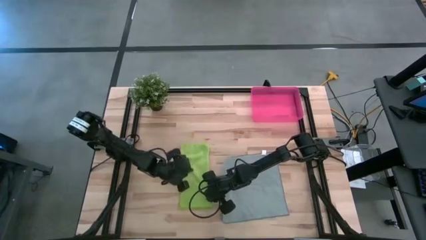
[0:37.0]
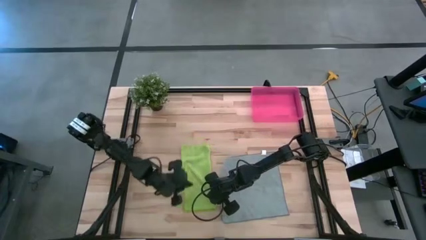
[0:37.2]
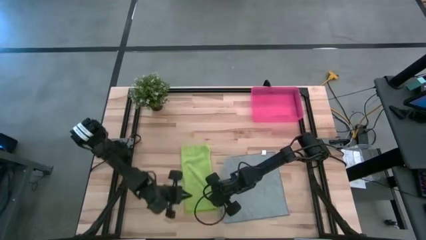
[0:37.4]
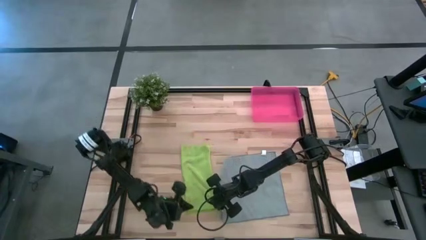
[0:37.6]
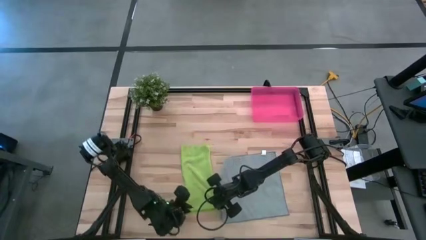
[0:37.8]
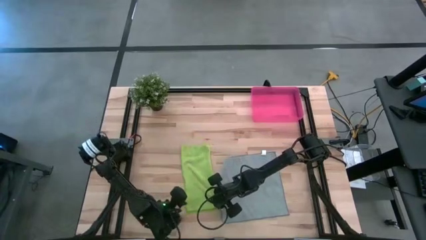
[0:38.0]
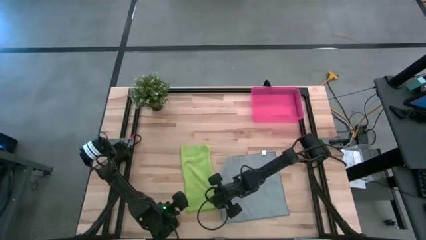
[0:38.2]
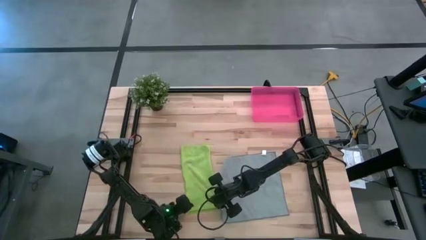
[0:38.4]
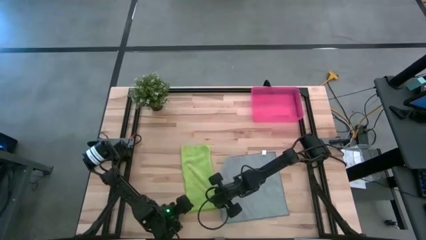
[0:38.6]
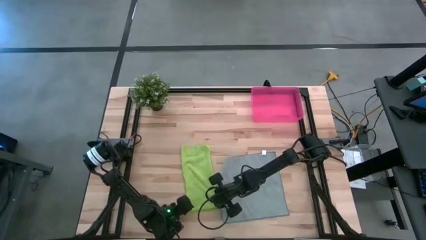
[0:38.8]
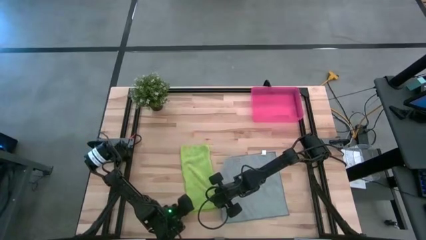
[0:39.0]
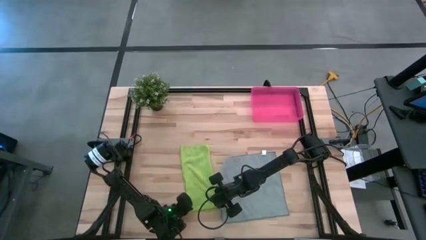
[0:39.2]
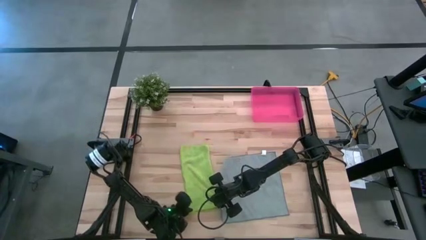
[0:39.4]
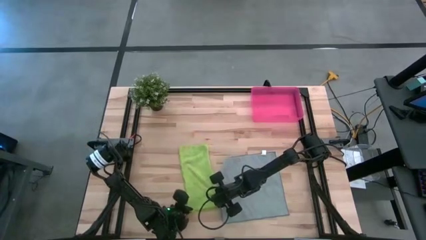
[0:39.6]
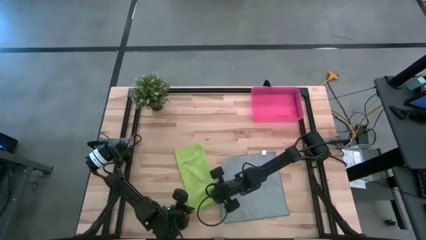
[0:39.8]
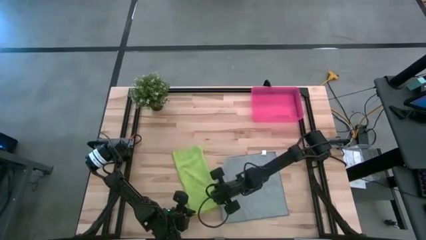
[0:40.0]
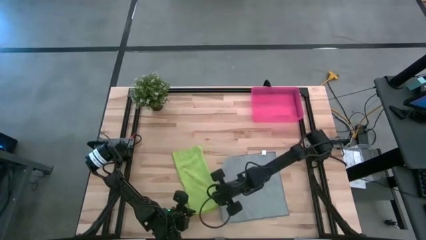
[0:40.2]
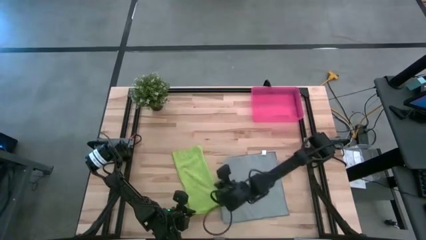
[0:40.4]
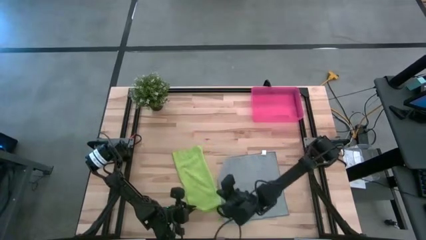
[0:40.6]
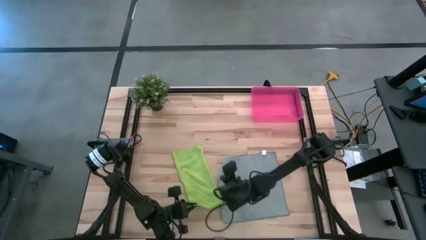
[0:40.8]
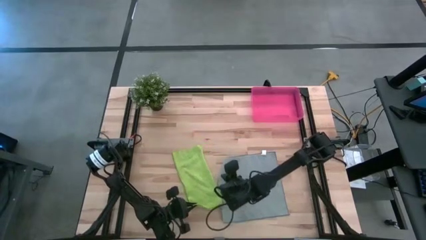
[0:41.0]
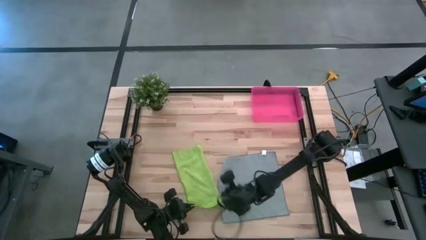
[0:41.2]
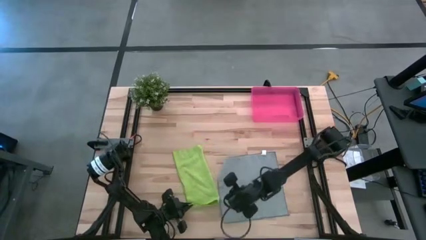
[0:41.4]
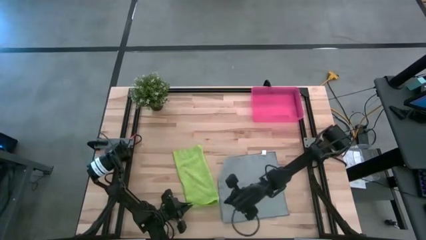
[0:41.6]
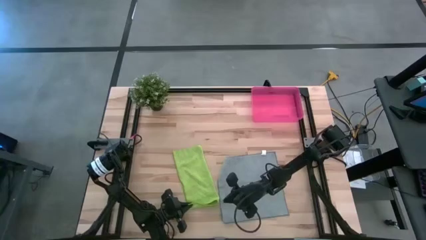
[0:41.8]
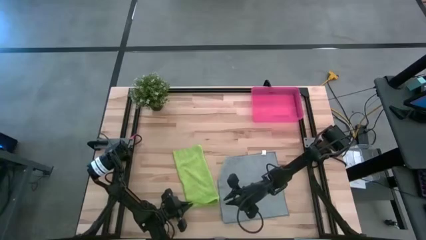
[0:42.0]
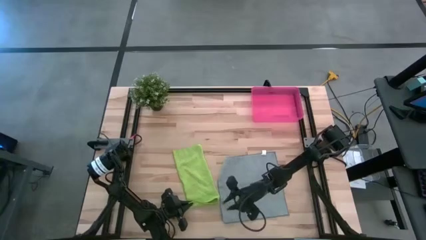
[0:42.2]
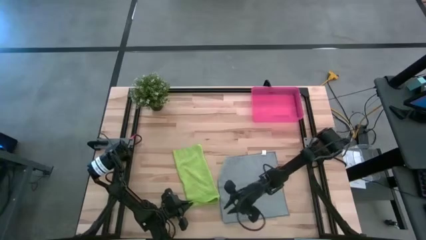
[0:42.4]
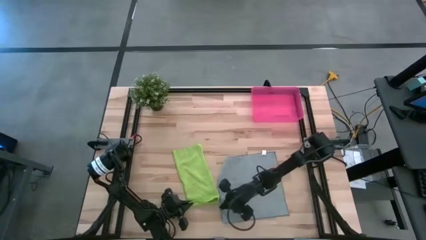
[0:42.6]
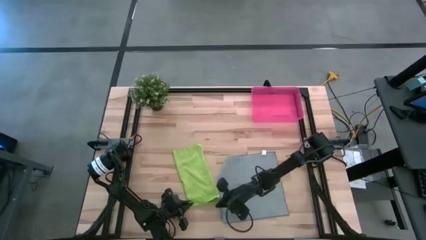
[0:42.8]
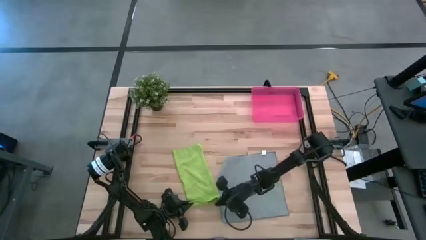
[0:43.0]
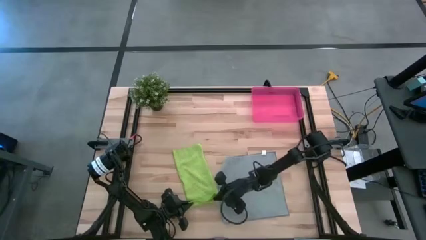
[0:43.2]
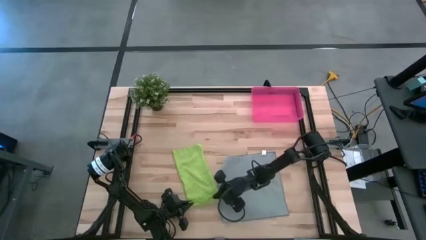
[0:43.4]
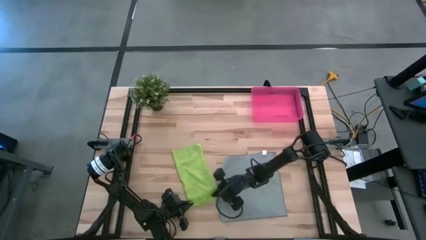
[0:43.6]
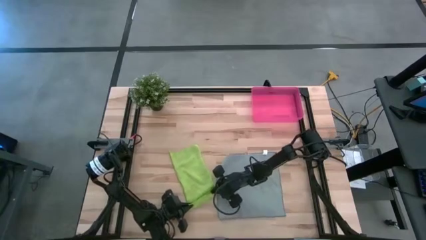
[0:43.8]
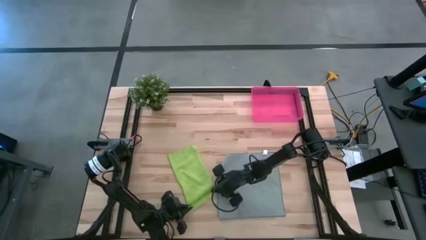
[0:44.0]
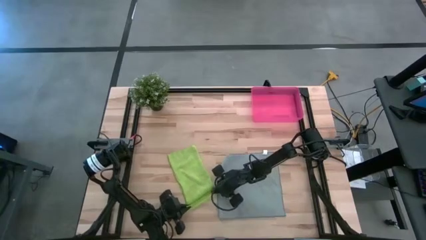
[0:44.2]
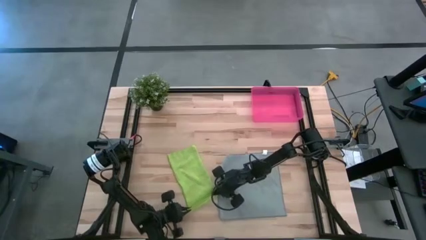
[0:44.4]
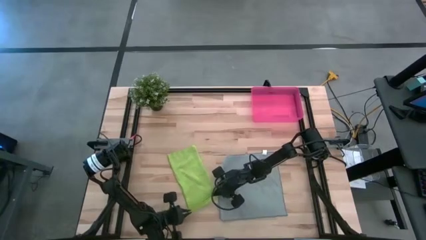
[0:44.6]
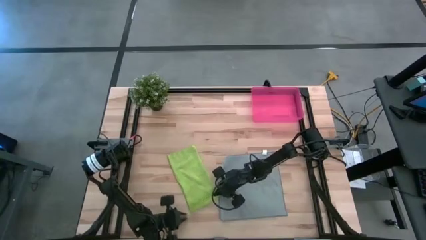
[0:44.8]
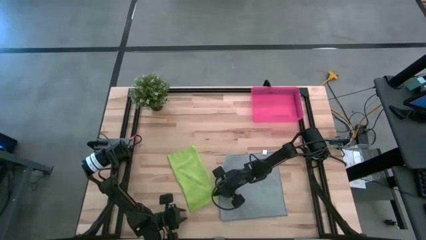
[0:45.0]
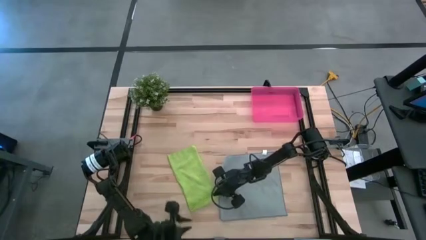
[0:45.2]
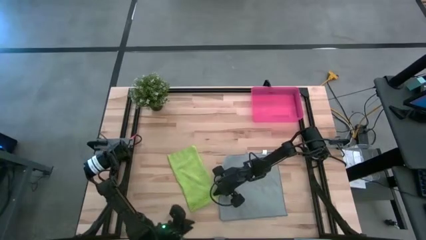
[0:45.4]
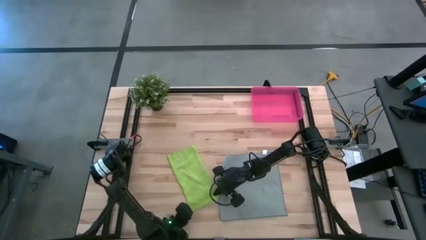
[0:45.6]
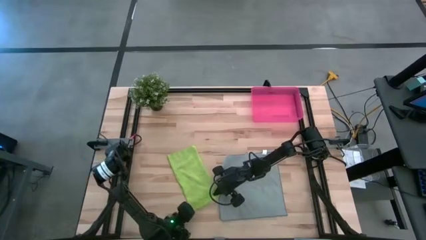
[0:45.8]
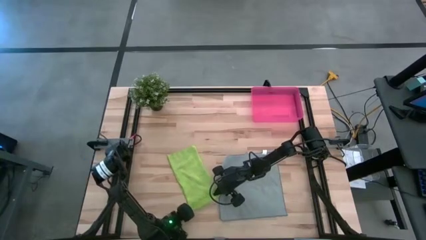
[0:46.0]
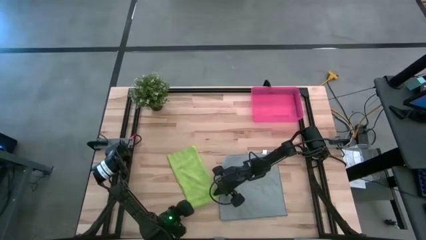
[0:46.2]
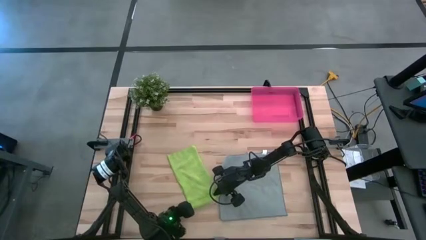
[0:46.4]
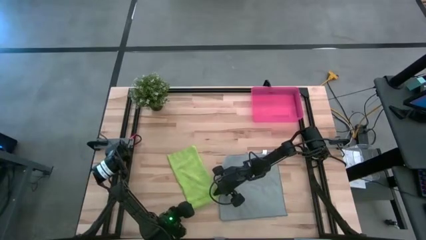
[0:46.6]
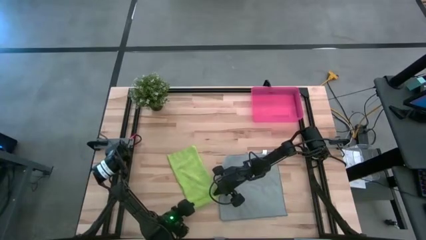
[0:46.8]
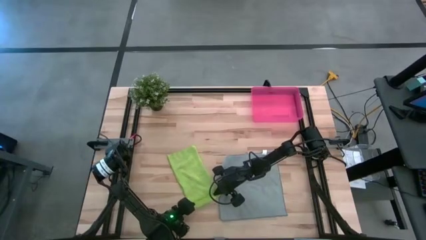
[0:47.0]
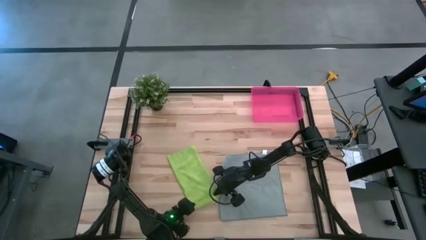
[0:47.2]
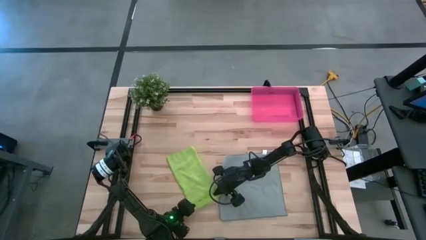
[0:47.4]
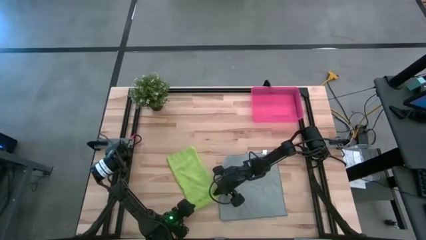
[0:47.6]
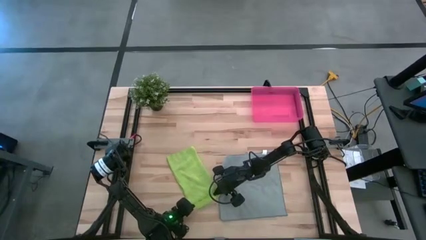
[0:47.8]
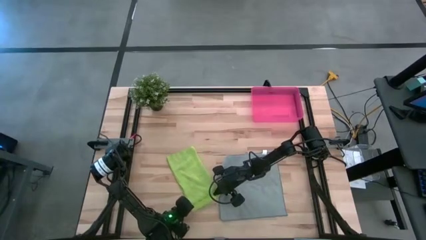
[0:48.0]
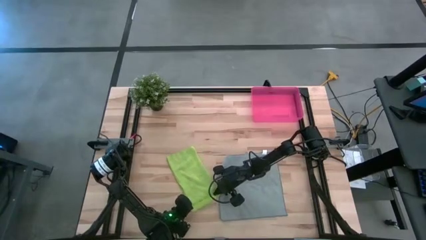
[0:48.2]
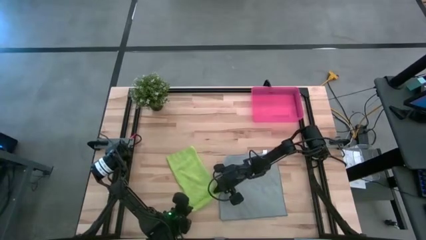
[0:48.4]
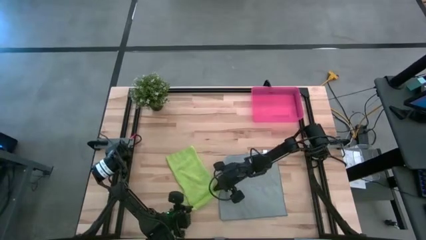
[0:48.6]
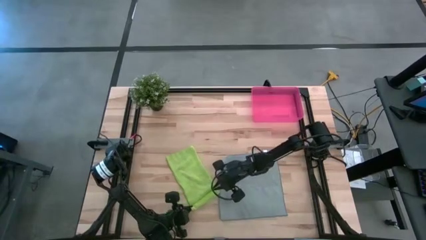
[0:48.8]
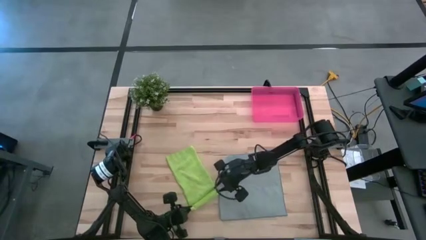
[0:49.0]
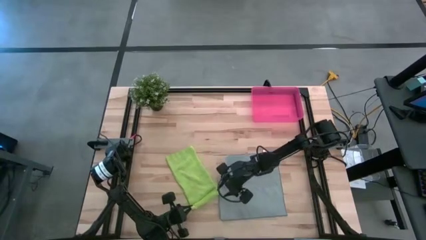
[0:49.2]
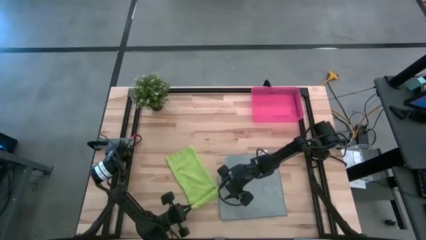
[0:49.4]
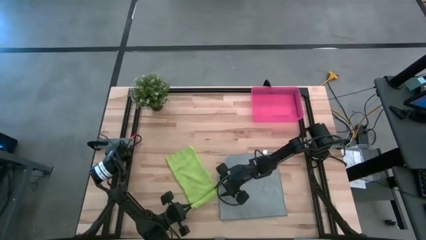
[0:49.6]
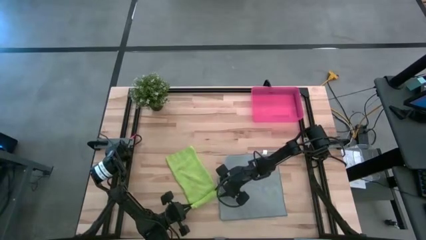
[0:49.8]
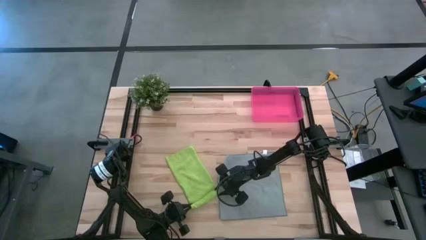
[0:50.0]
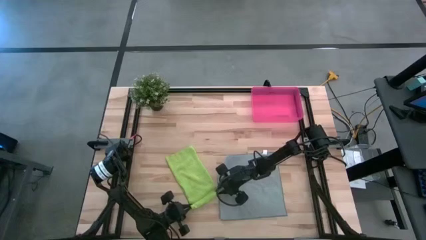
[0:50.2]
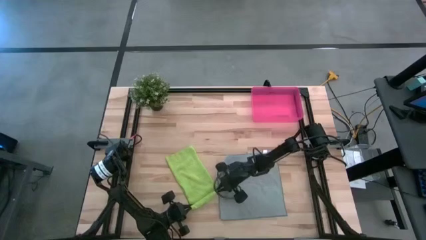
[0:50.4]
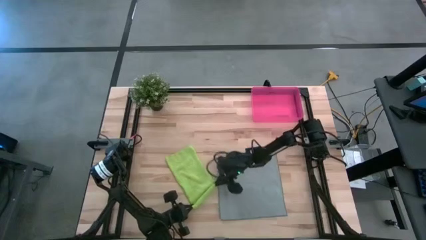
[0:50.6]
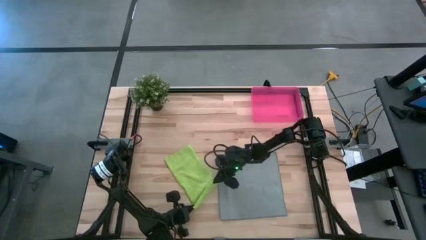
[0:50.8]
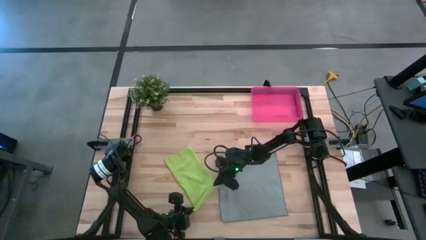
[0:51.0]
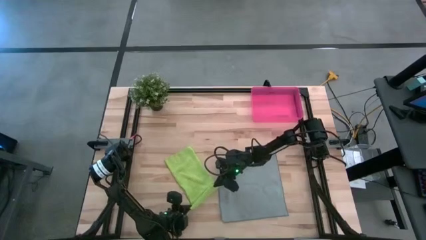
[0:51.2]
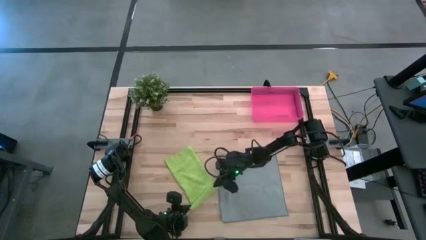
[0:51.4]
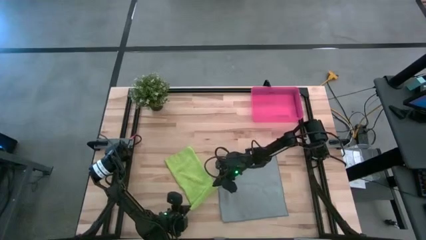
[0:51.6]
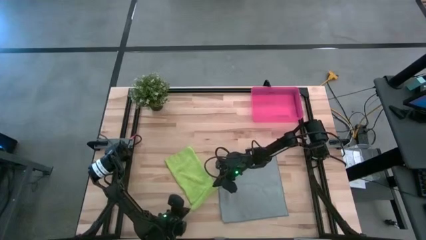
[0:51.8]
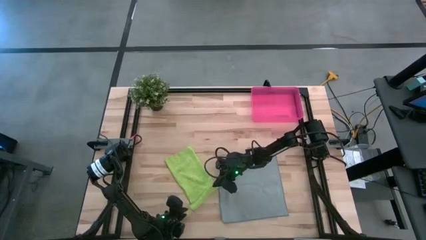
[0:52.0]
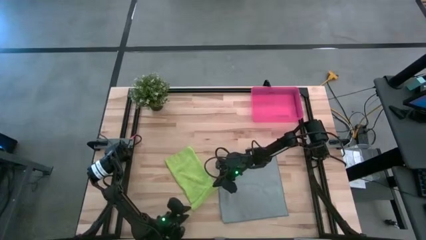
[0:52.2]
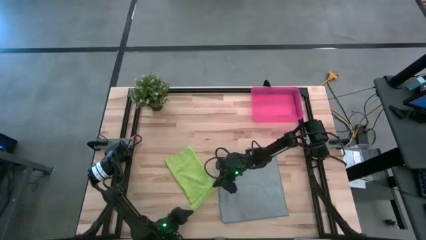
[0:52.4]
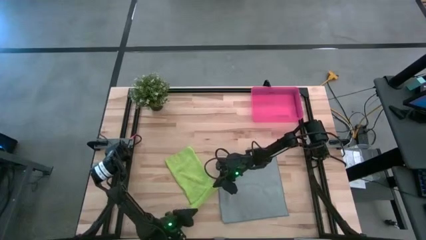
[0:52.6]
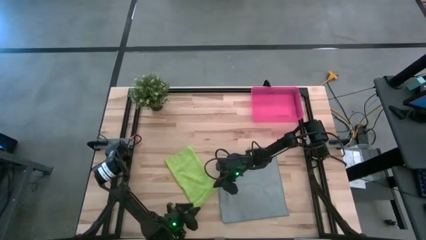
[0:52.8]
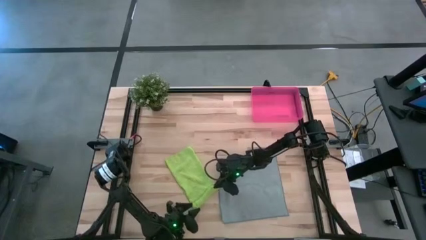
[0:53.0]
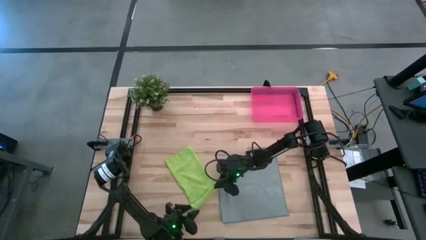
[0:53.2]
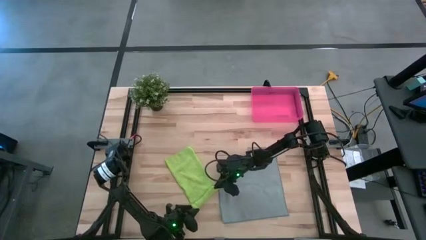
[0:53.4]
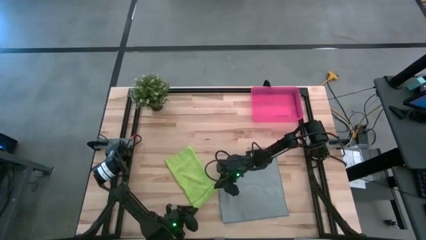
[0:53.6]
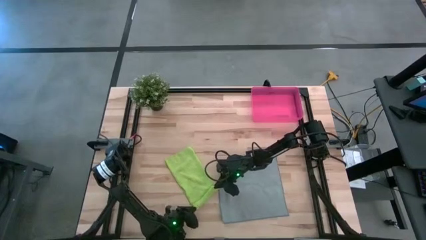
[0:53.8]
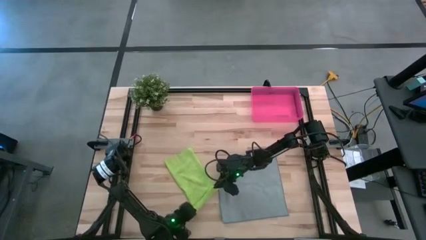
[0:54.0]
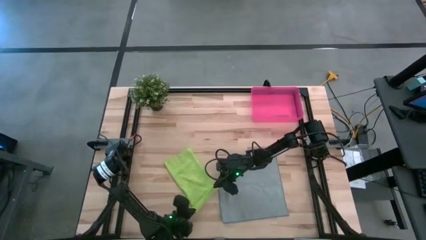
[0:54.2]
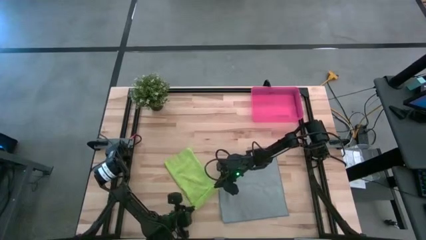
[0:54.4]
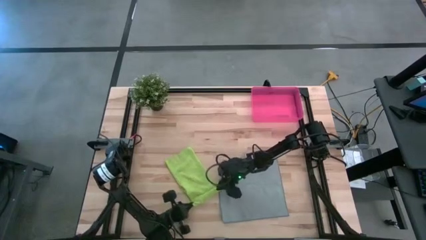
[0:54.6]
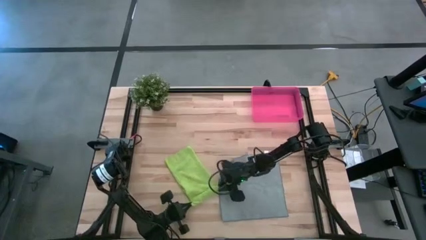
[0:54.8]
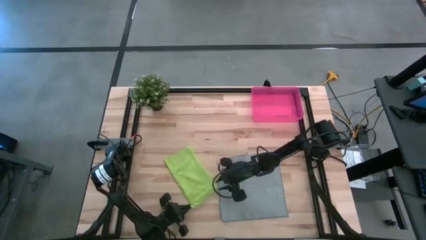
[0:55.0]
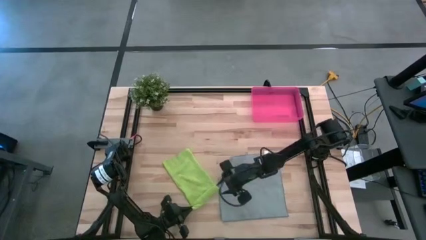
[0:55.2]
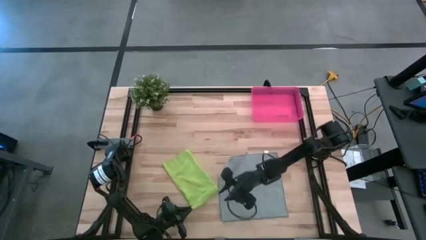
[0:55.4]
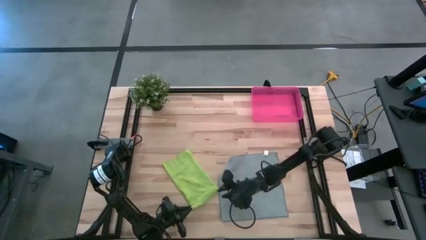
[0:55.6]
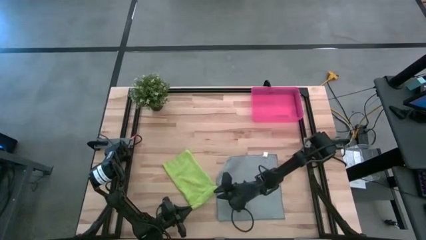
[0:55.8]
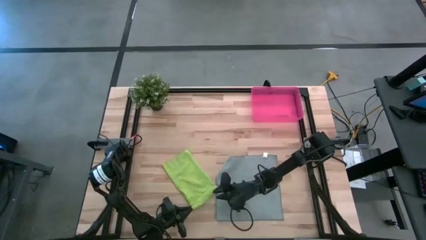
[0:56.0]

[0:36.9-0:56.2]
Task: Roll microfiber towels into tight, uniform cylinder then place into a basket
Roll the green microfiber cloth
